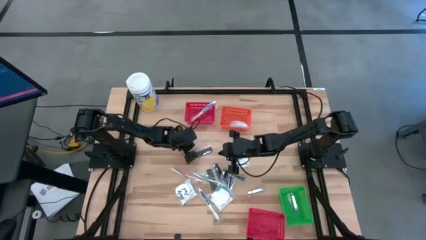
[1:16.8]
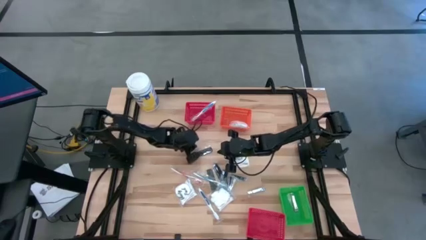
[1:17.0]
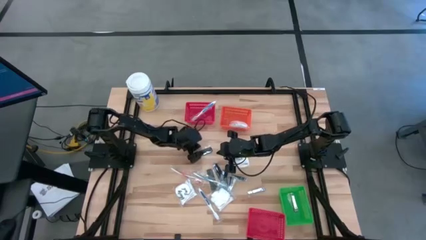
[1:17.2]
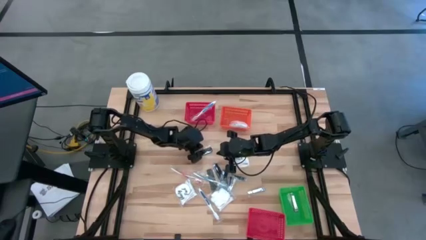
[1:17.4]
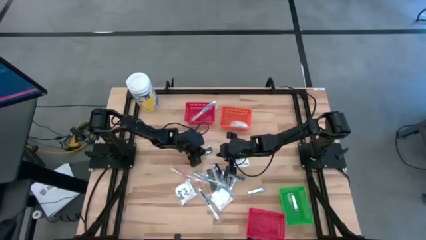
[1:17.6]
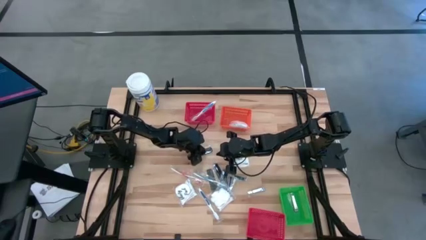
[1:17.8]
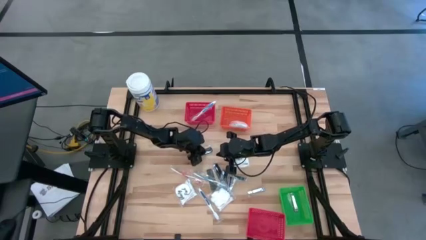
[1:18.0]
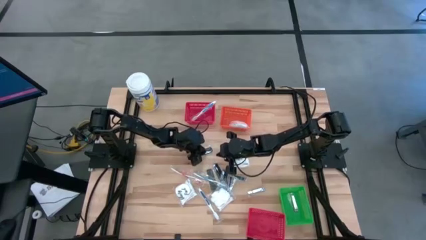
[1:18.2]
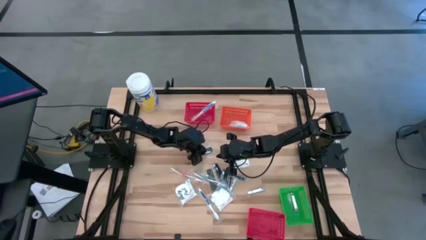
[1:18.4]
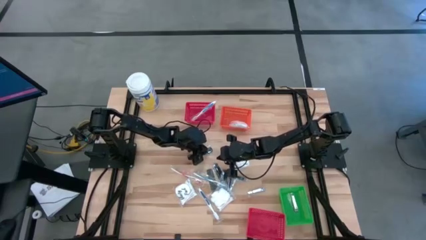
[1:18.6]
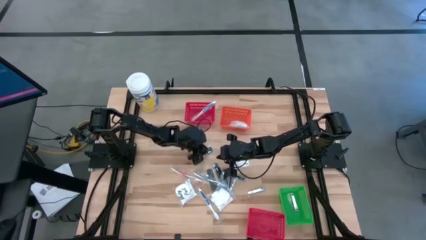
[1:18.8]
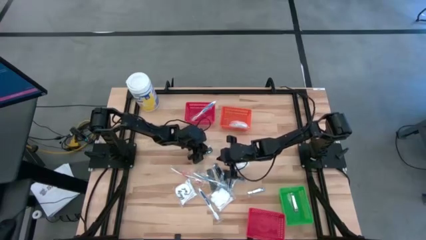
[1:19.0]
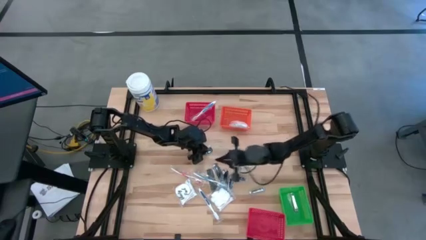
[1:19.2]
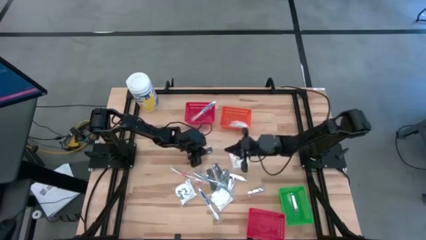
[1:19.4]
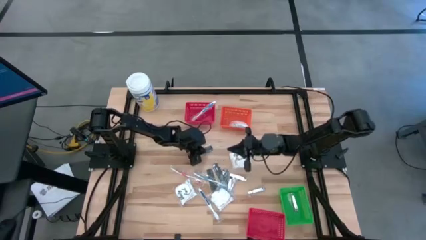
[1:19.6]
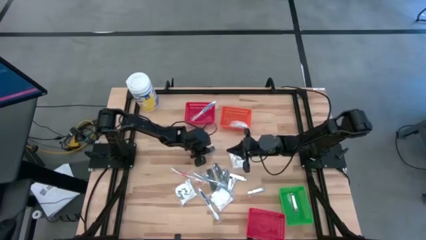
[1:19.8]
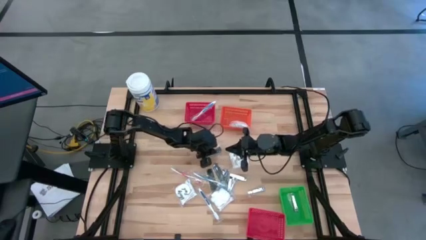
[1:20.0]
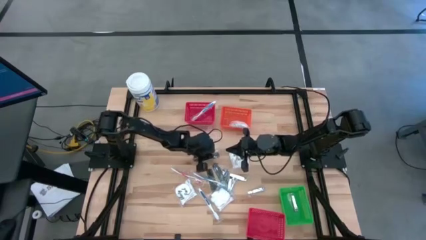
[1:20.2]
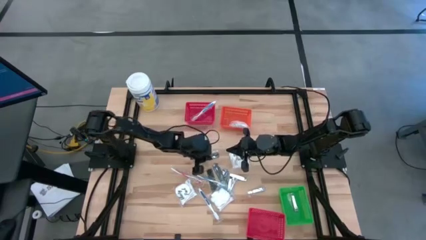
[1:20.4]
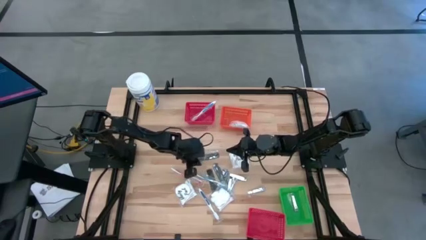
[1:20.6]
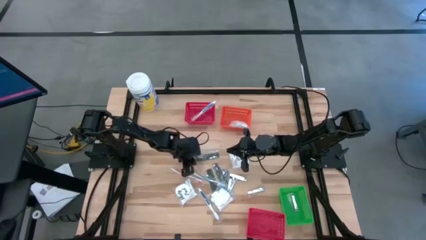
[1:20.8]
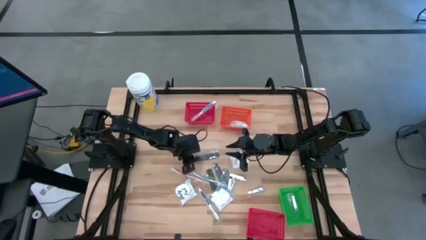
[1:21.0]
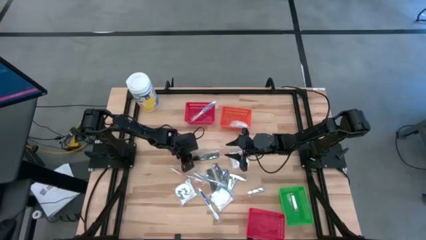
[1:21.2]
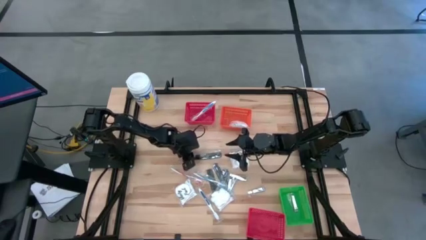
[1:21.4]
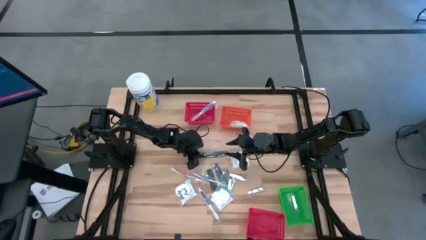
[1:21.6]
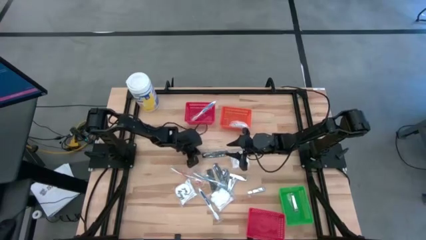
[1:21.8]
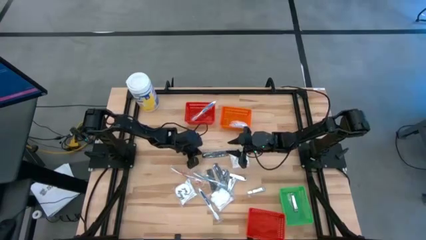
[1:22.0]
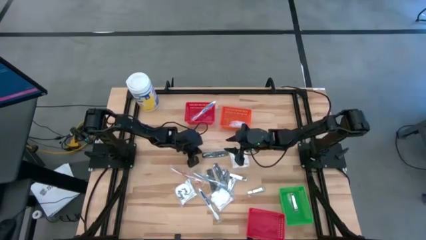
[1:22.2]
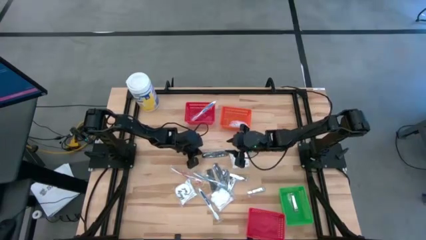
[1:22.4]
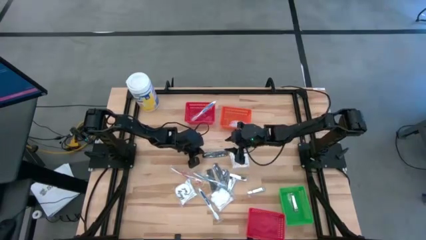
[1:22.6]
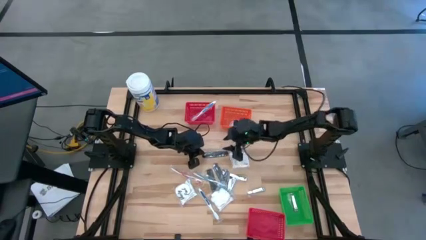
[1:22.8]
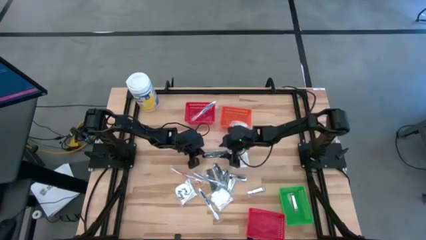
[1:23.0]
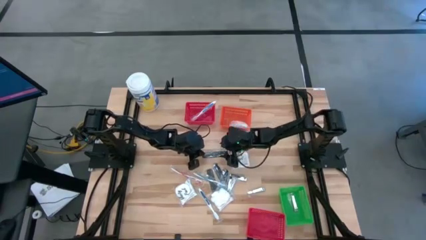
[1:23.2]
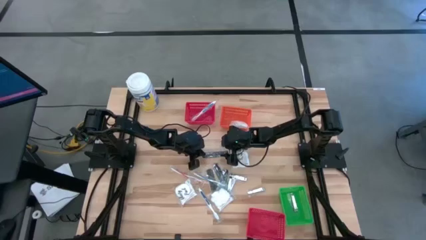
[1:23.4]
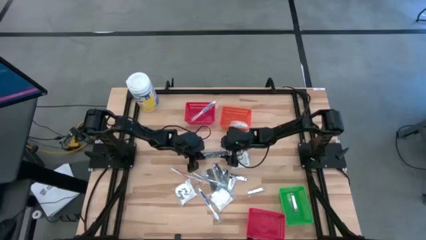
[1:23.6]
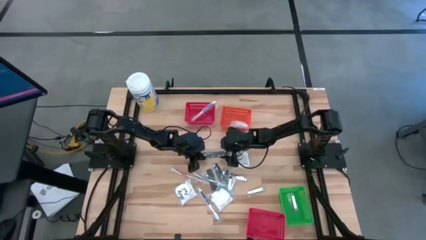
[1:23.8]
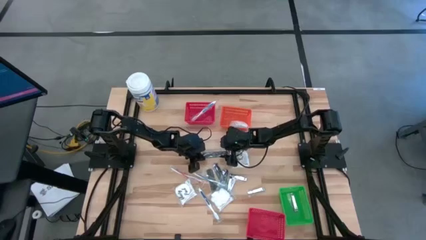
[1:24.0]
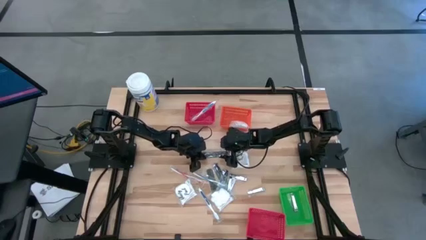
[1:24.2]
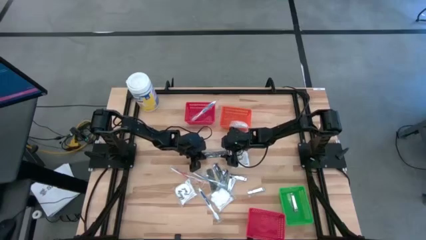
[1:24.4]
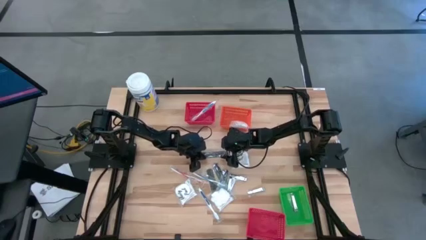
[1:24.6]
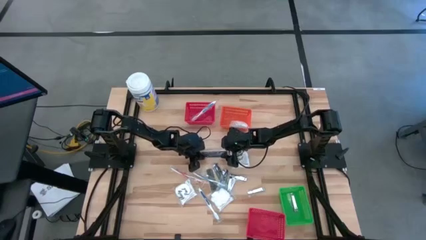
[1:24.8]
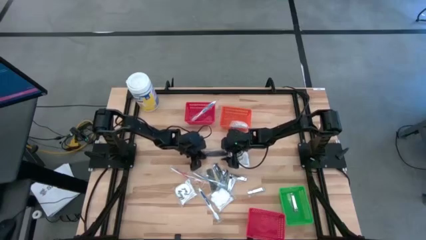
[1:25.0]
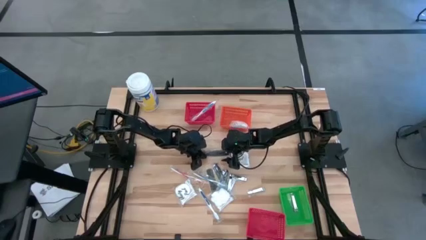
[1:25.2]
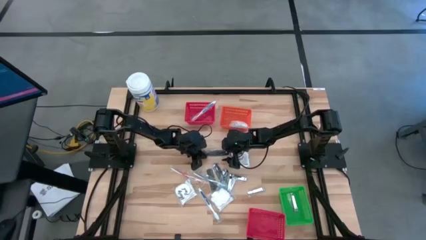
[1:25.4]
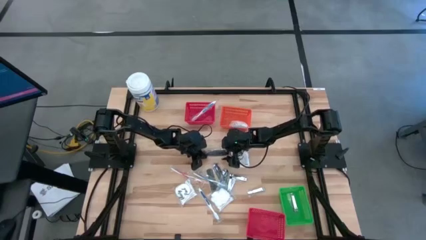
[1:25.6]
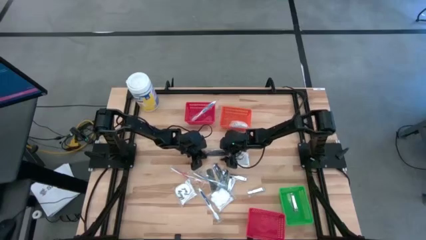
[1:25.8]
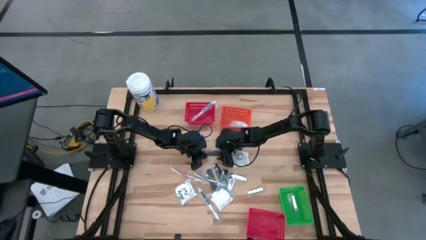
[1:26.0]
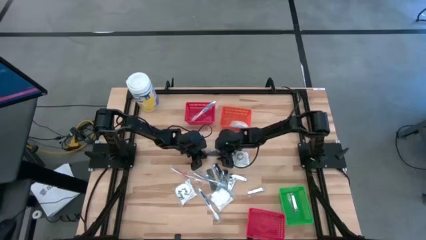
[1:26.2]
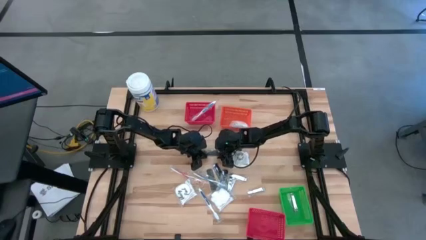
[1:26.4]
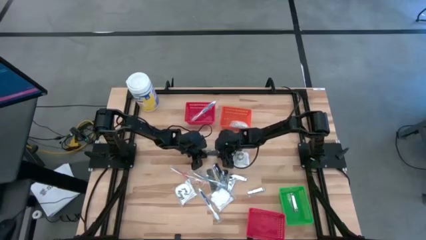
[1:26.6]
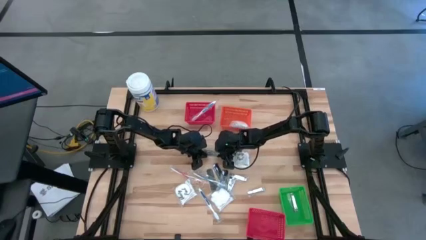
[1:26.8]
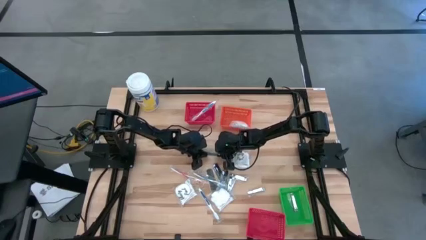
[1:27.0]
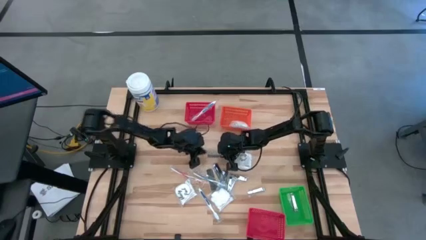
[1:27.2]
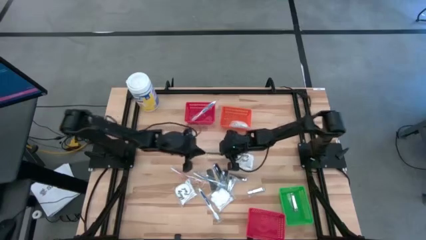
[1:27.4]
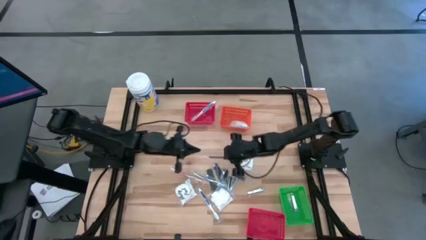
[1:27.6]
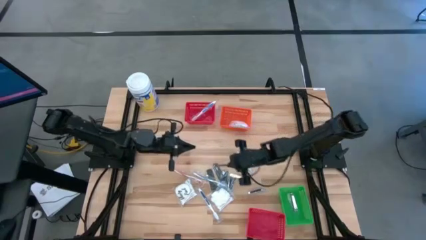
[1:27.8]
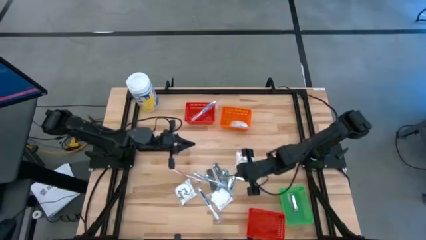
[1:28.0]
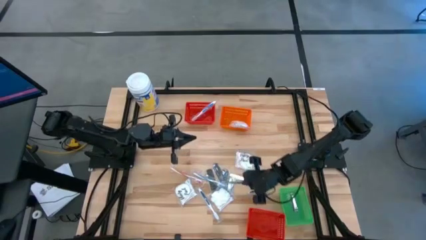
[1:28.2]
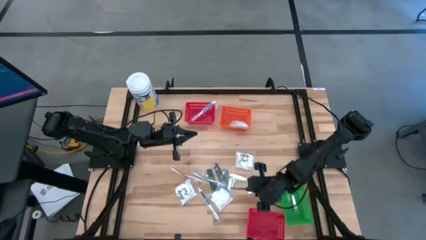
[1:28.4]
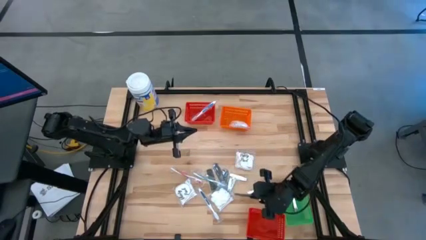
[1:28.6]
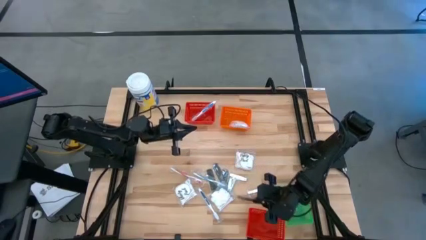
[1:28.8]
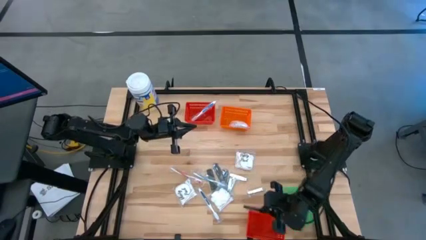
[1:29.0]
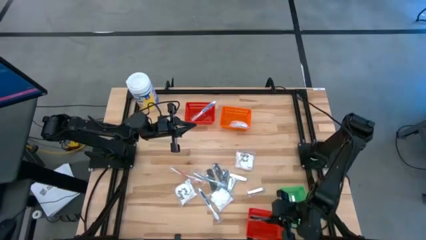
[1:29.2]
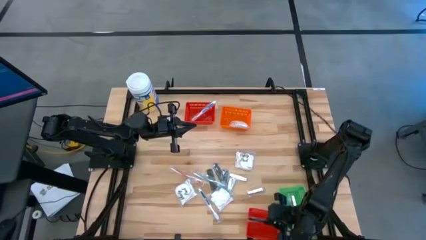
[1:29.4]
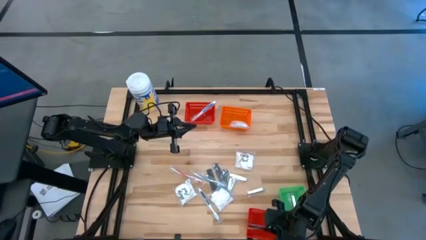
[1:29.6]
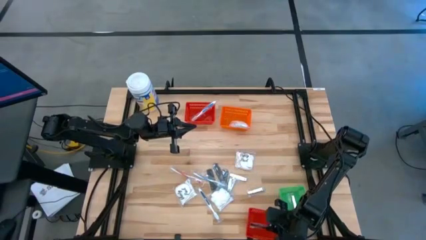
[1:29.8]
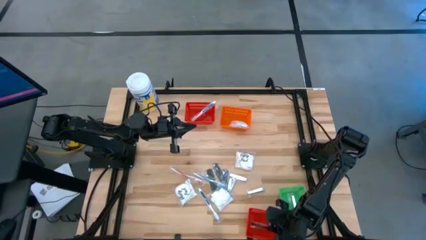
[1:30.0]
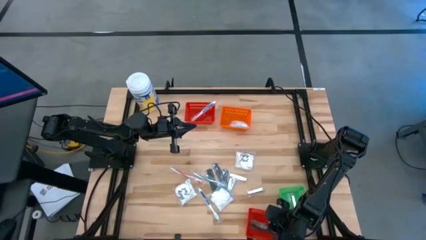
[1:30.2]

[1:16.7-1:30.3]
Task: Pick & Place Travel size toiletries
Put the black hair comb into the bottom red bin
